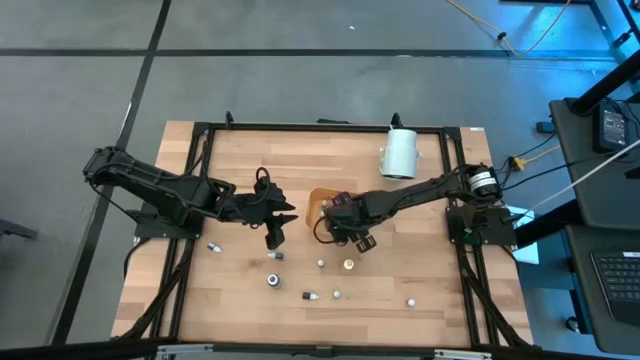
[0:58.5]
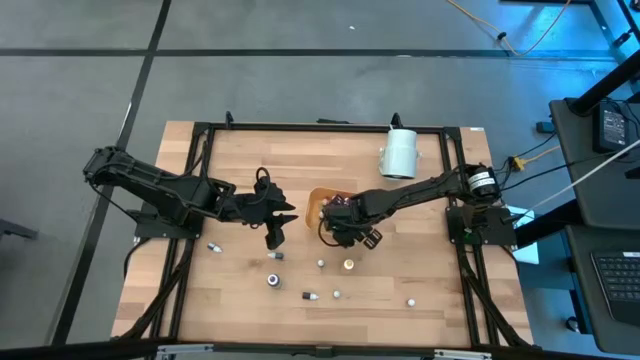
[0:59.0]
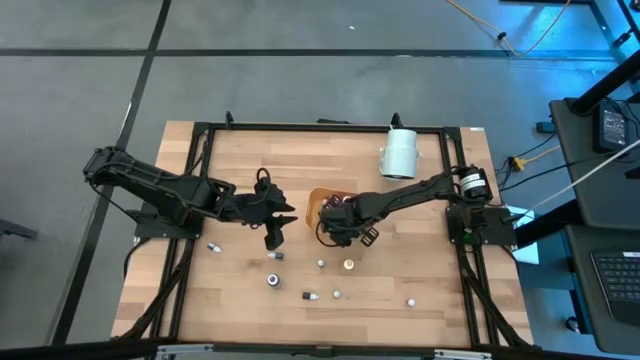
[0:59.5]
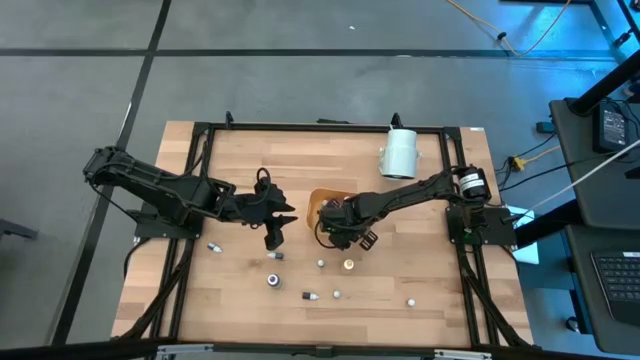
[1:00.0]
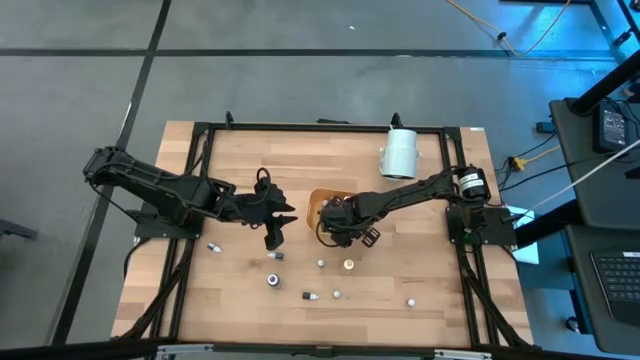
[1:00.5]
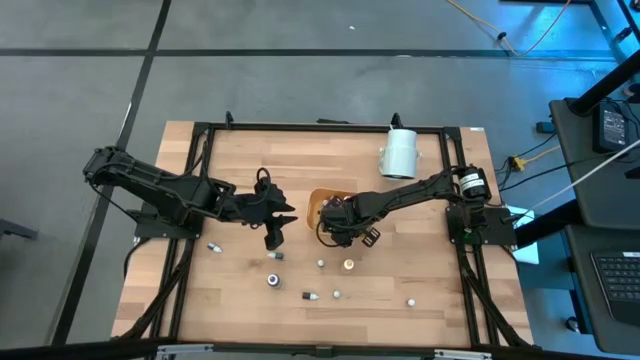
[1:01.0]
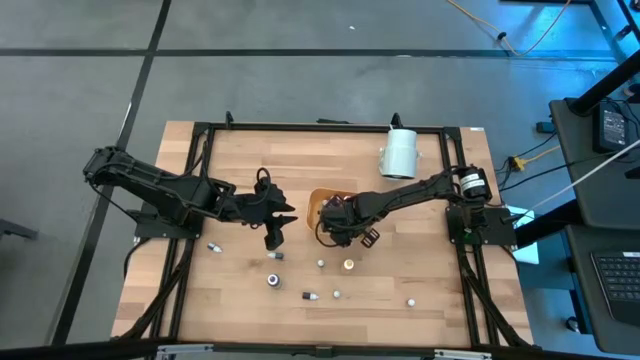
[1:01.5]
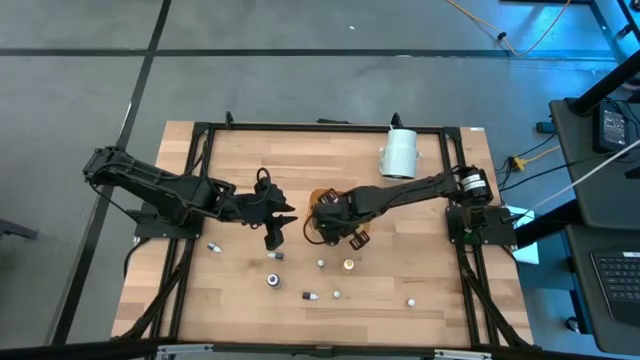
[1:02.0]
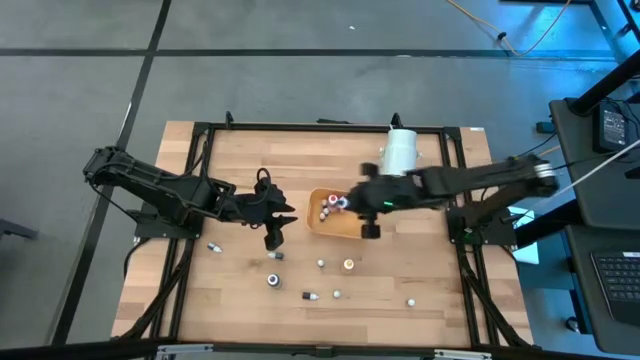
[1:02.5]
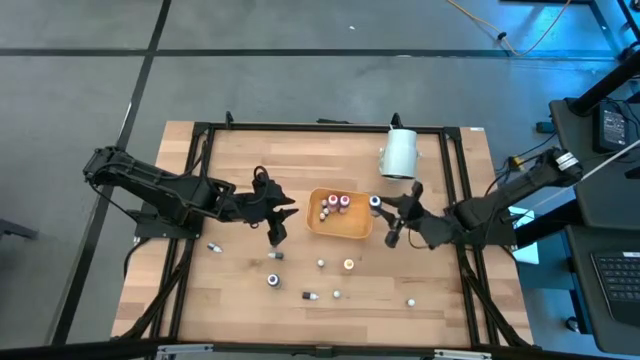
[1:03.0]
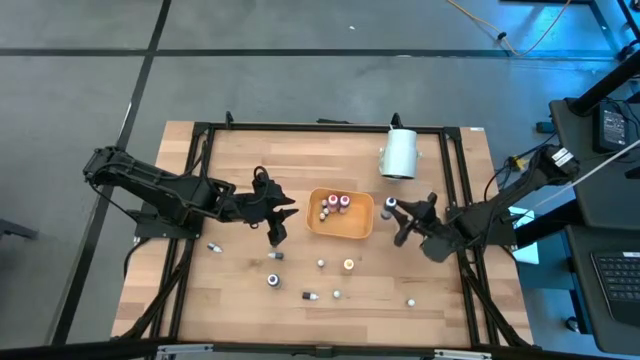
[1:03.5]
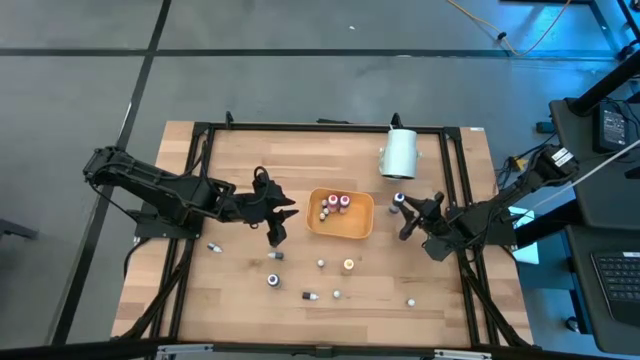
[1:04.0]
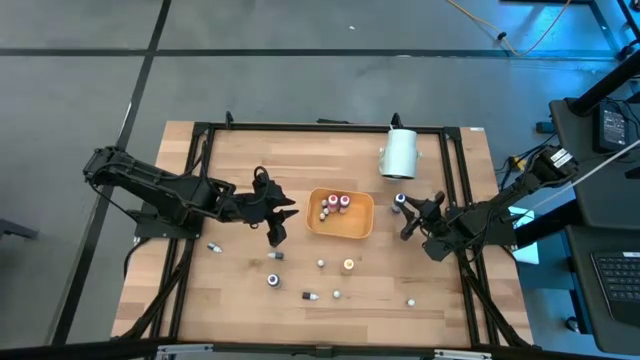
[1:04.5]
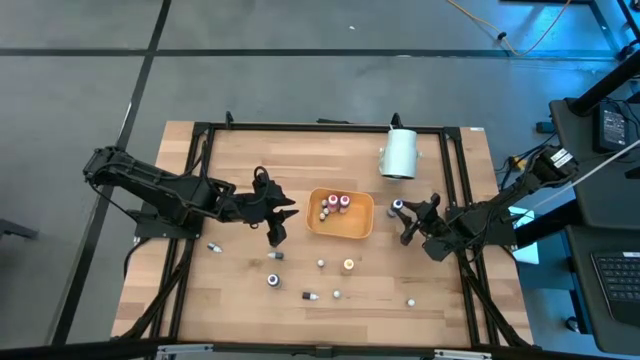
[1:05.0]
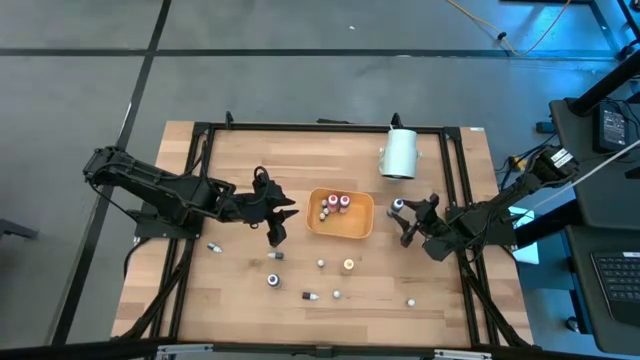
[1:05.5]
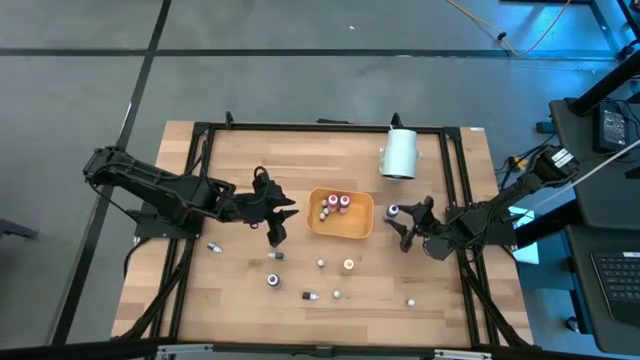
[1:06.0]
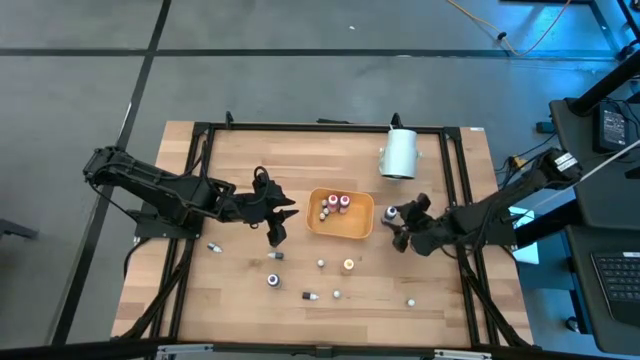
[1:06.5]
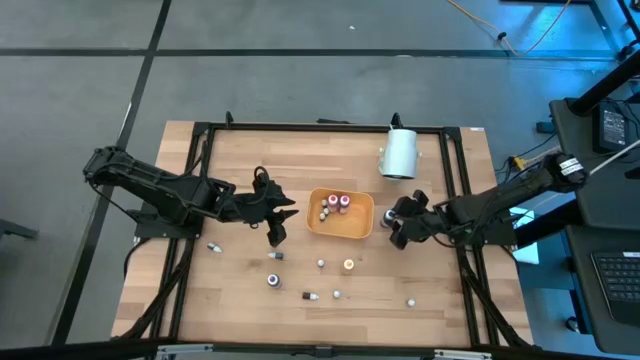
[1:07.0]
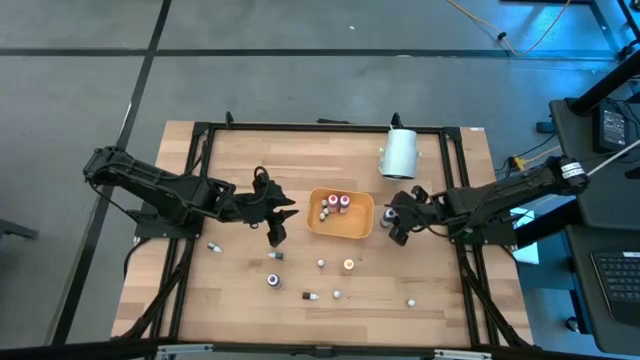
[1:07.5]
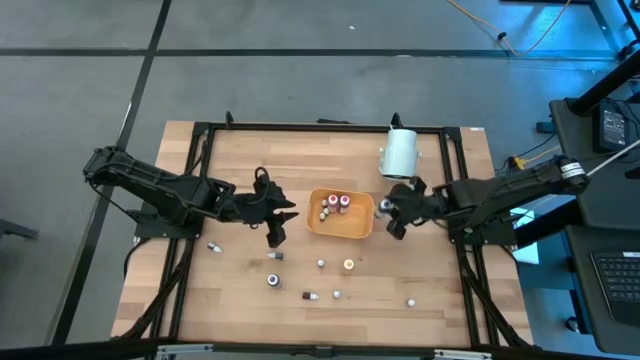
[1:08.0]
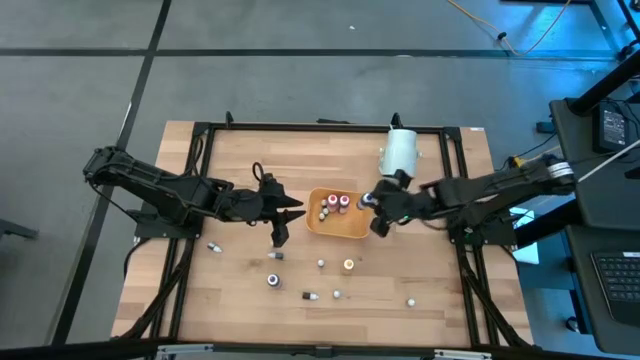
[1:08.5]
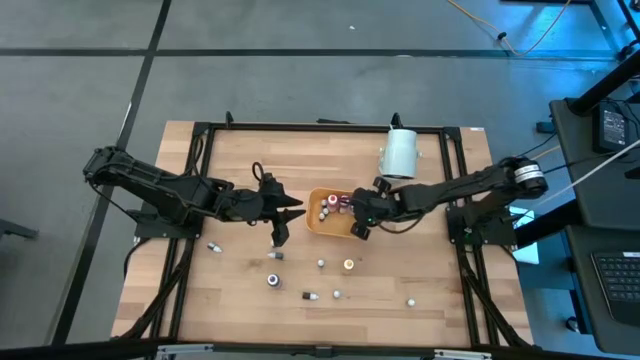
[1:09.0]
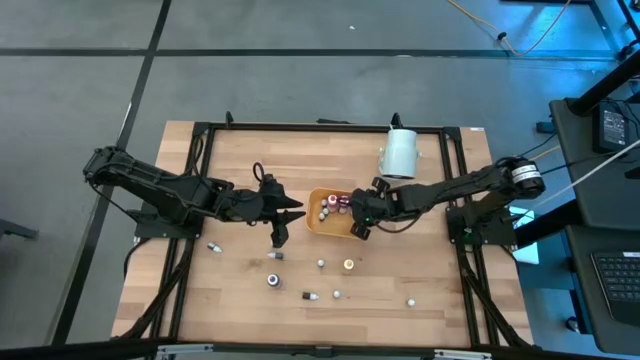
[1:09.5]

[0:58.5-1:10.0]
Task: Pick & Place food coloring
Adjust the large blue food coloring bottle in the yellow bin

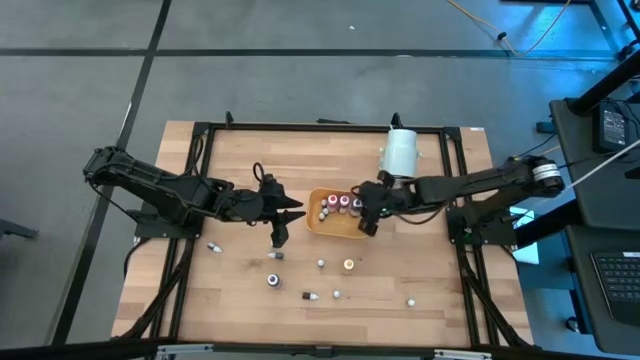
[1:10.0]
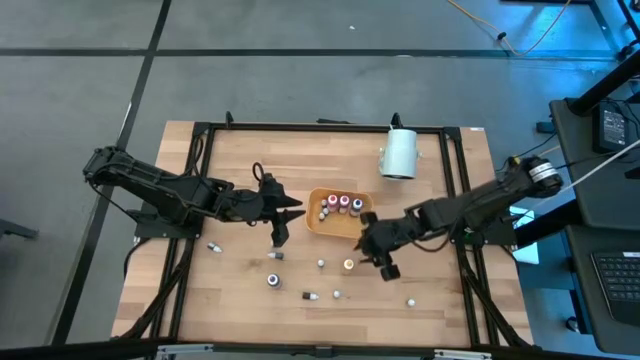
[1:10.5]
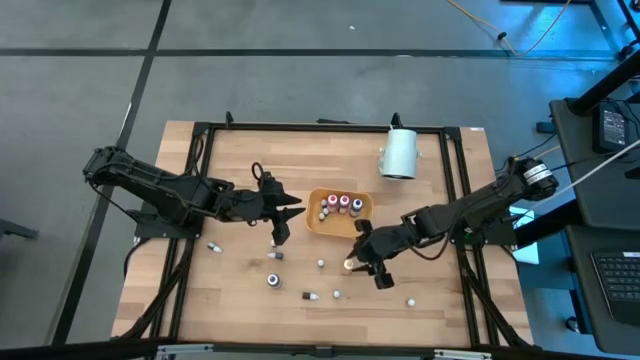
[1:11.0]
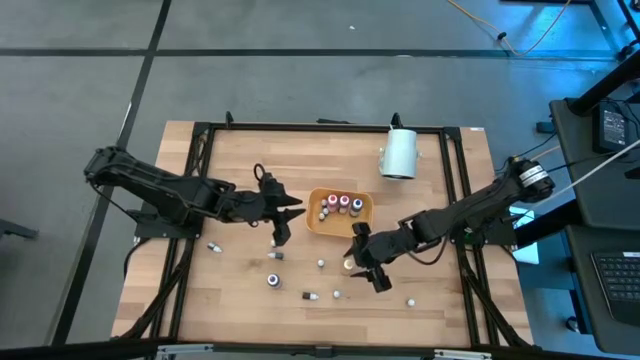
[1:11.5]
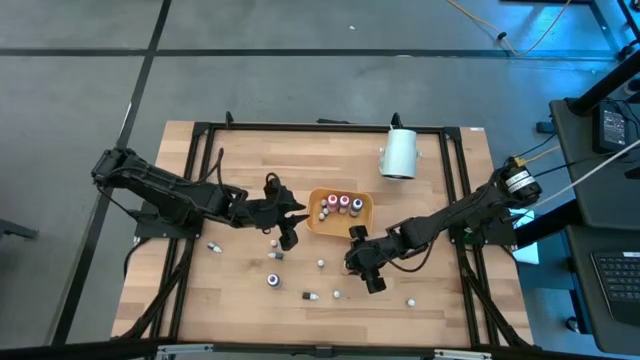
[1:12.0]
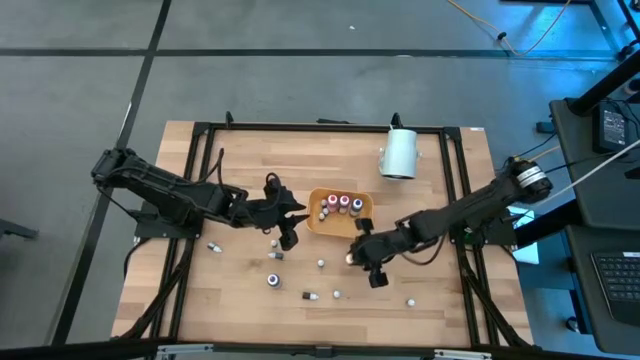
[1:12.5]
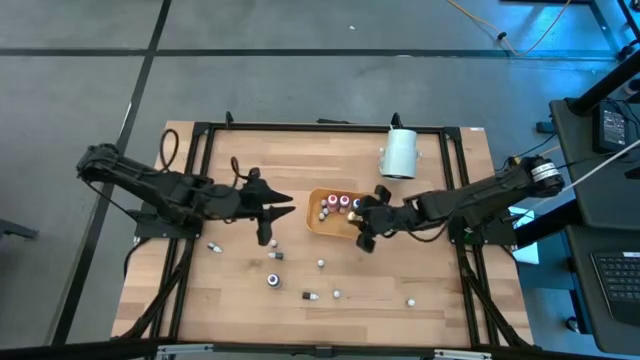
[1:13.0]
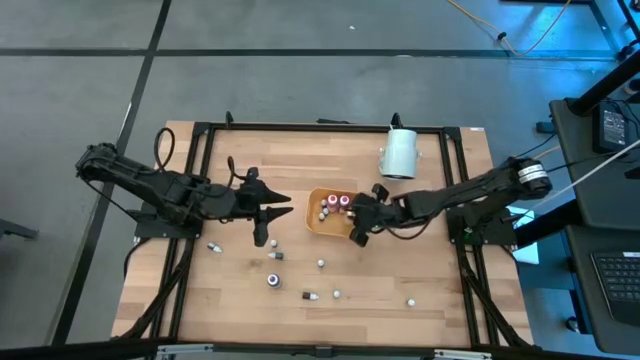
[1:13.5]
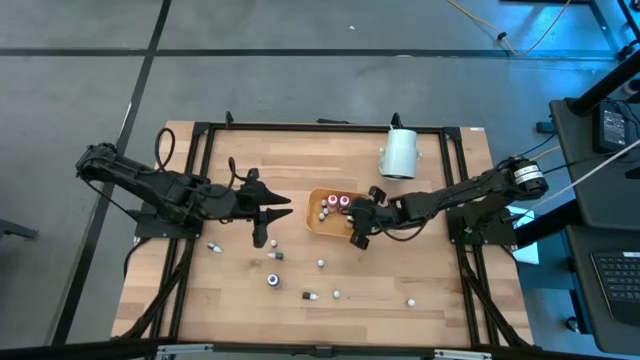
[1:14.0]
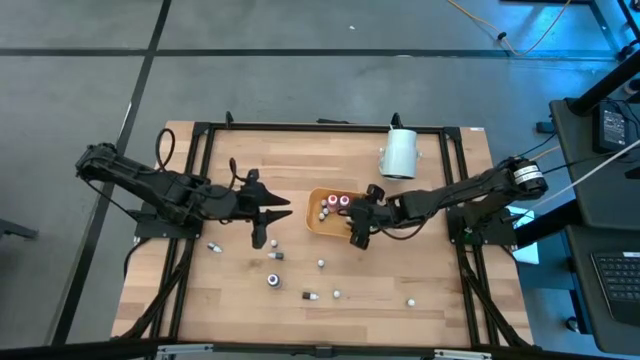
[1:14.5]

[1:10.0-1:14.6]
Put the large yellow food coloring bottle into the yellow bin

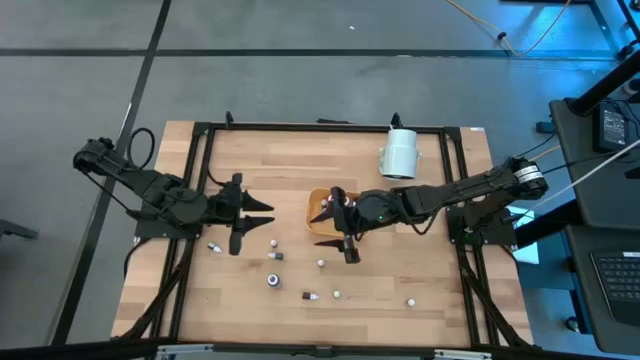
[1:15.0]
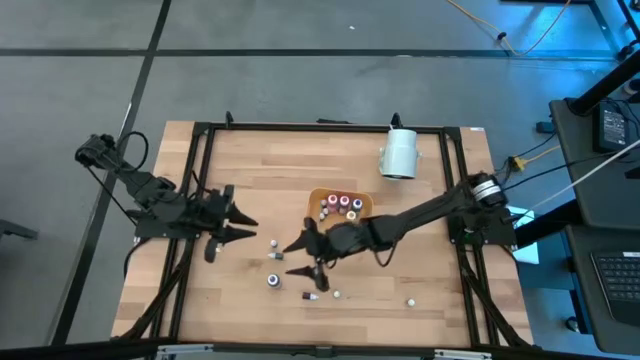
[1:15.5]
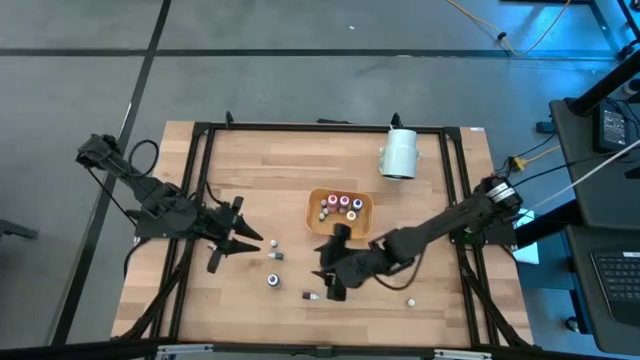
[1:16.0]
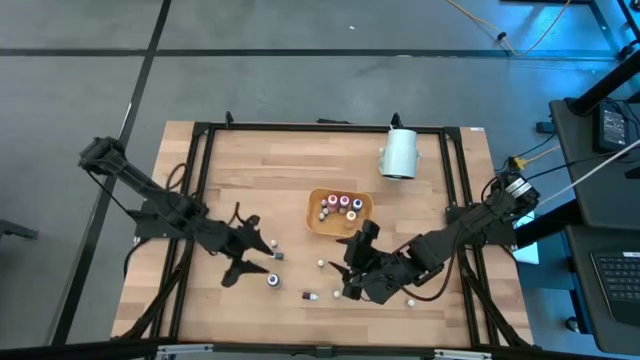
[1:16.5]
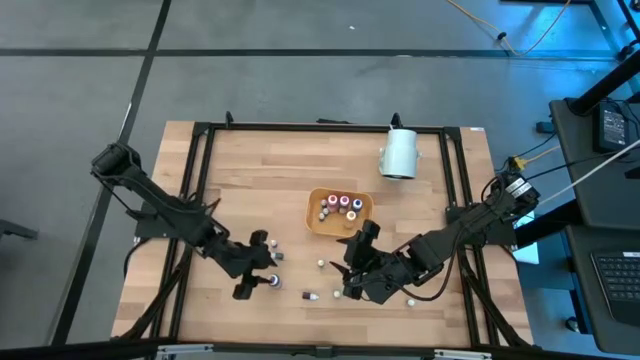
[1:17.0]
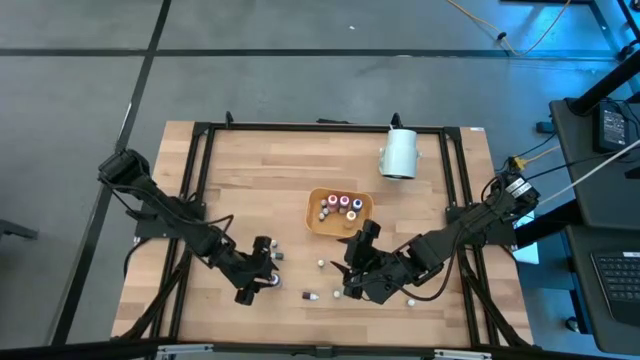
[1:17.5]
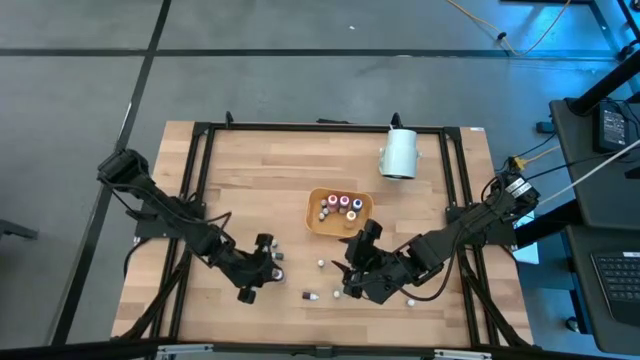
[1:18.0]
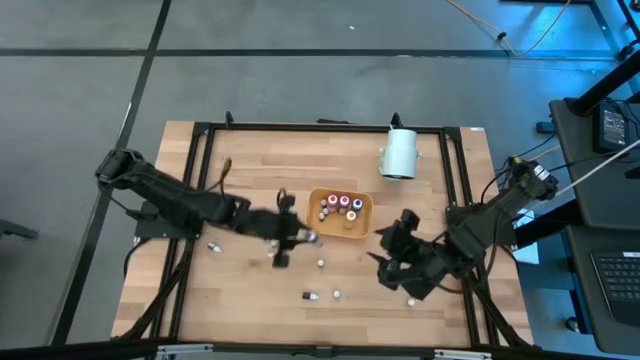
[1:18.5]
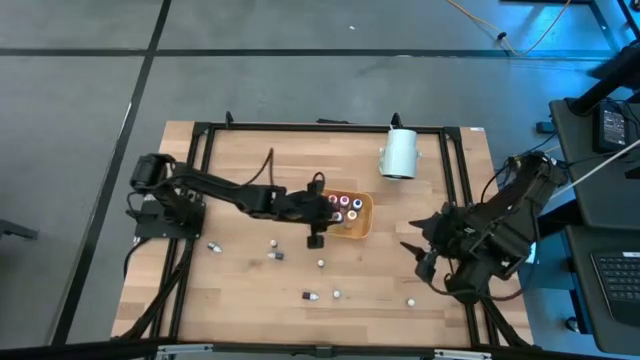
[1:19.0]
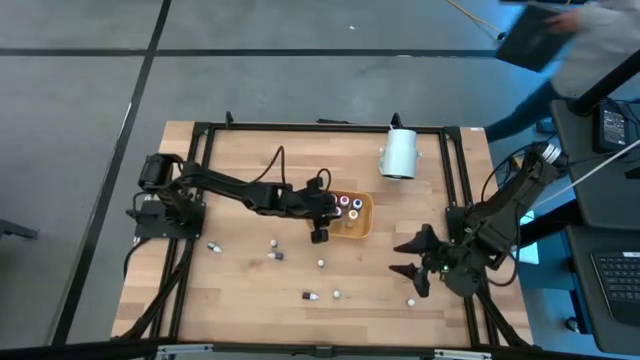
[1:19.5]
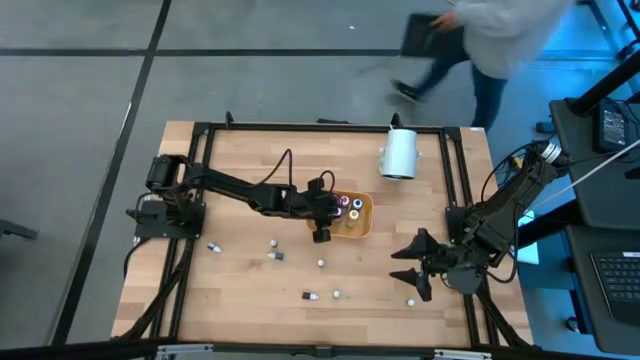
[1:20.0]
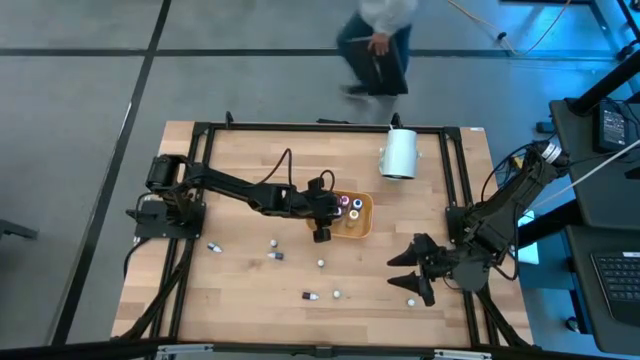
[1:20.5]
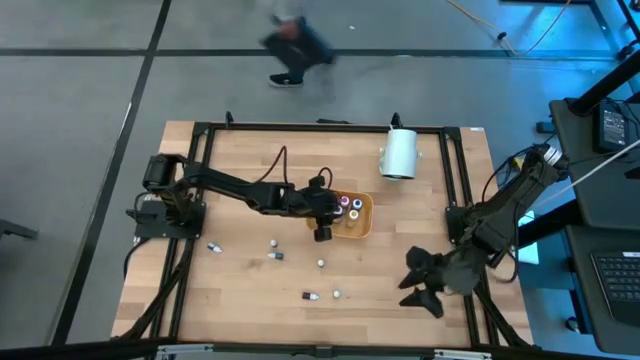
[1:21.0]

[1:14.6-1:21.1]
Put the large violet food coloring bottle into the yellow bin
